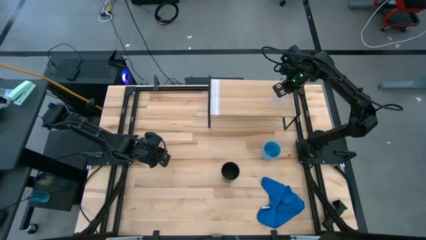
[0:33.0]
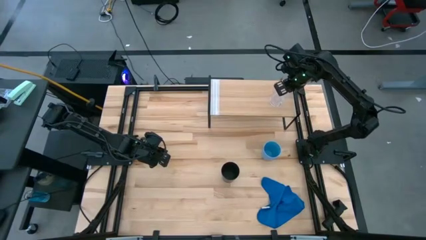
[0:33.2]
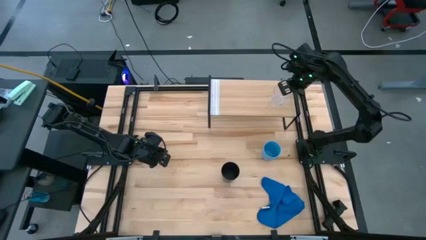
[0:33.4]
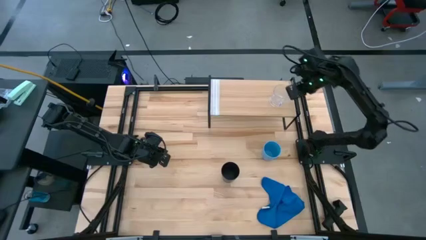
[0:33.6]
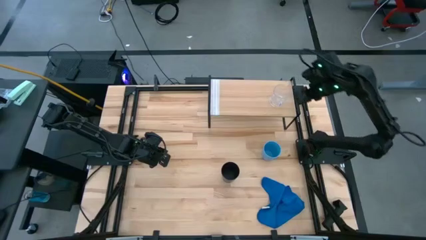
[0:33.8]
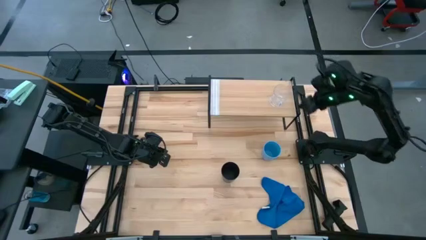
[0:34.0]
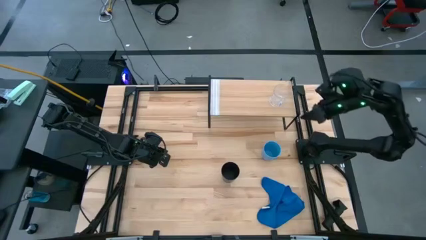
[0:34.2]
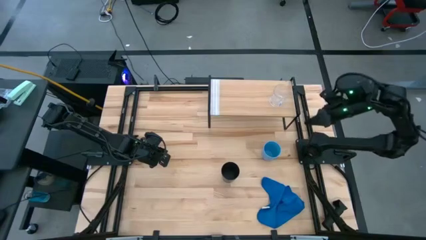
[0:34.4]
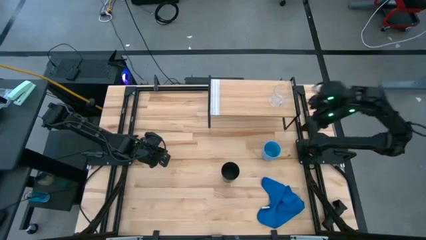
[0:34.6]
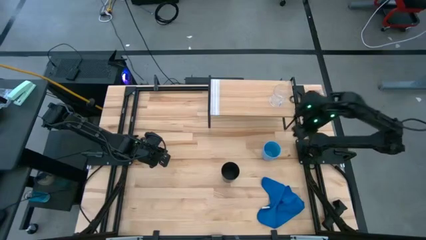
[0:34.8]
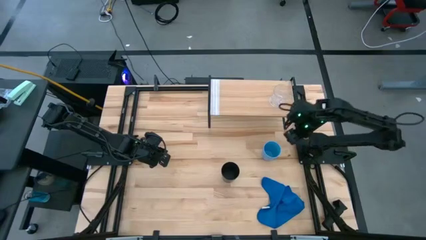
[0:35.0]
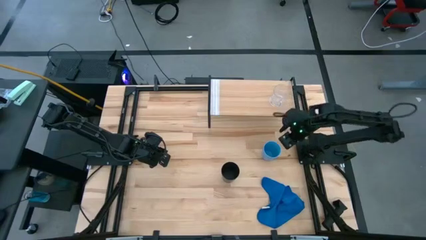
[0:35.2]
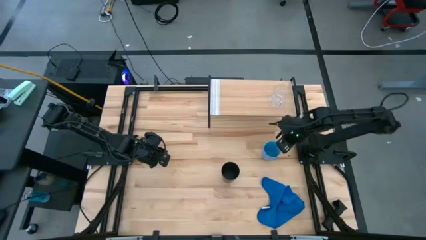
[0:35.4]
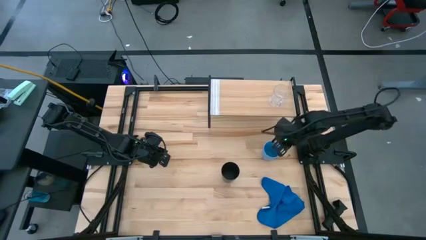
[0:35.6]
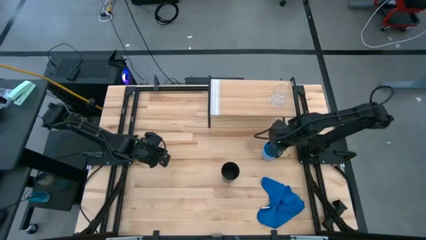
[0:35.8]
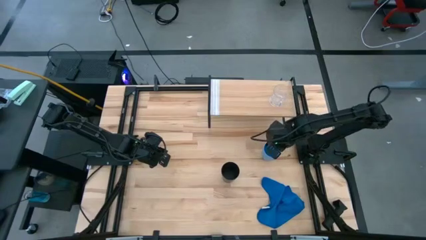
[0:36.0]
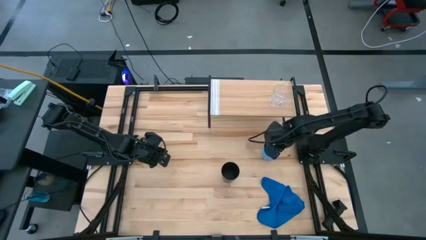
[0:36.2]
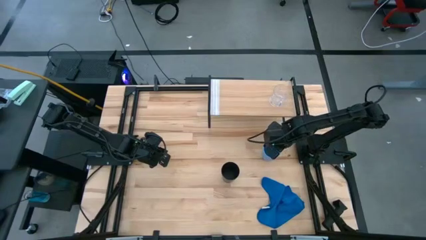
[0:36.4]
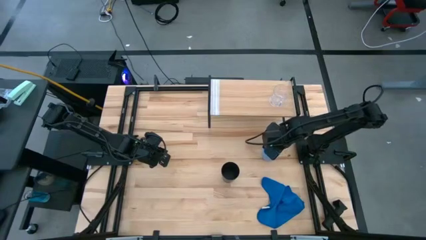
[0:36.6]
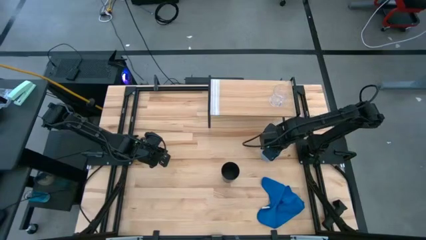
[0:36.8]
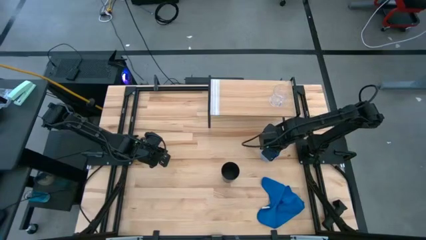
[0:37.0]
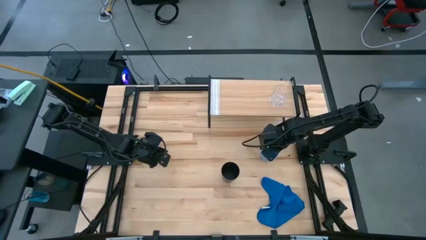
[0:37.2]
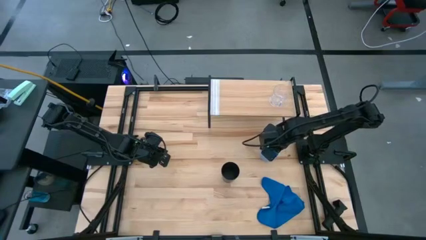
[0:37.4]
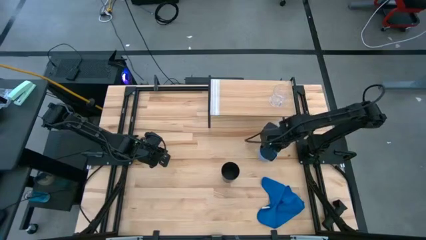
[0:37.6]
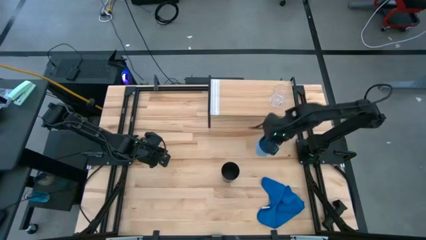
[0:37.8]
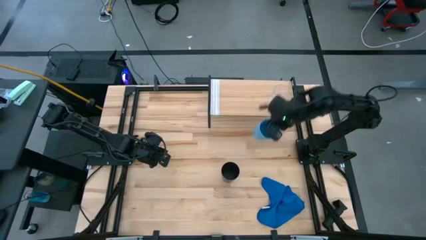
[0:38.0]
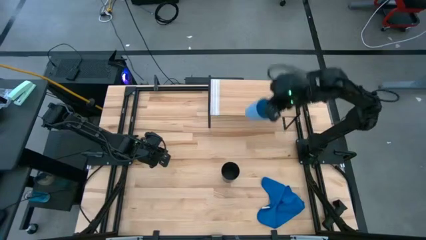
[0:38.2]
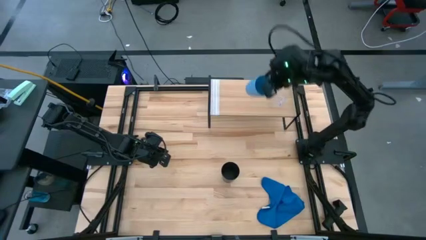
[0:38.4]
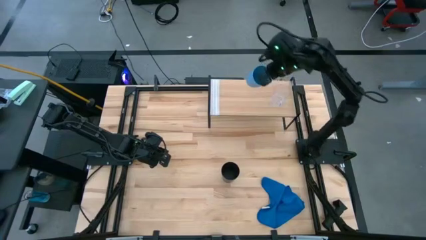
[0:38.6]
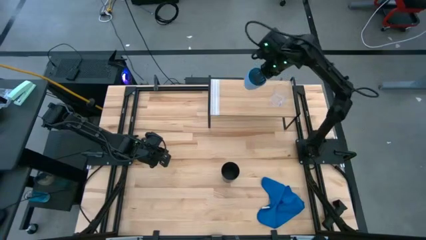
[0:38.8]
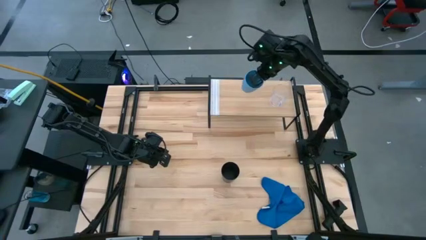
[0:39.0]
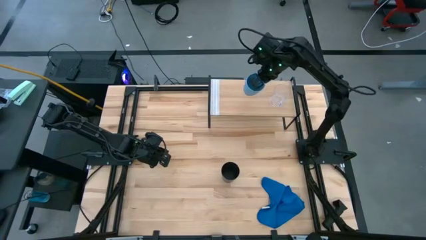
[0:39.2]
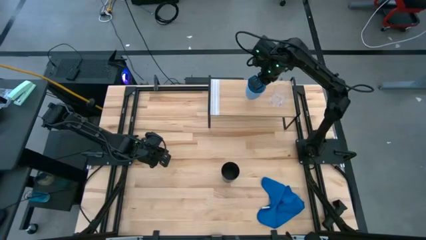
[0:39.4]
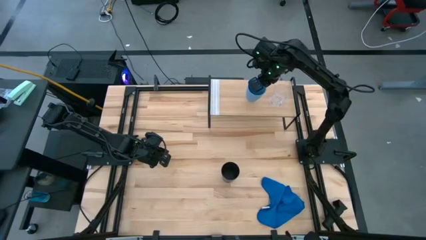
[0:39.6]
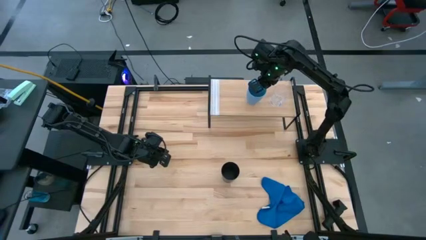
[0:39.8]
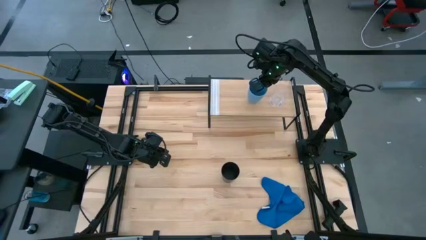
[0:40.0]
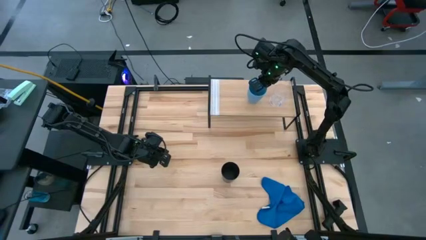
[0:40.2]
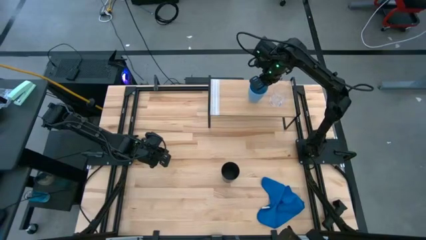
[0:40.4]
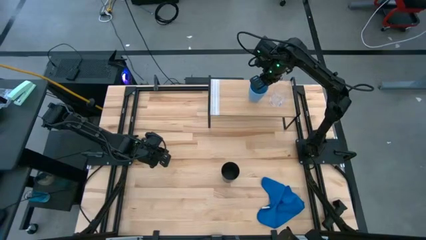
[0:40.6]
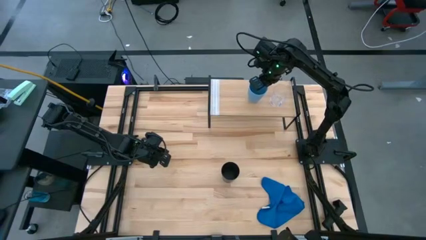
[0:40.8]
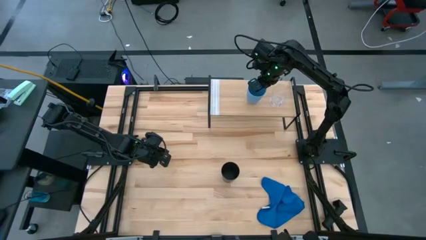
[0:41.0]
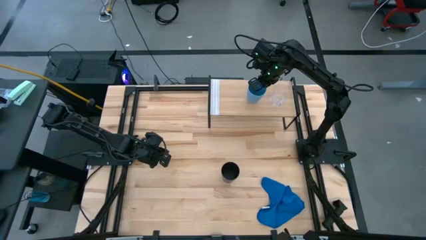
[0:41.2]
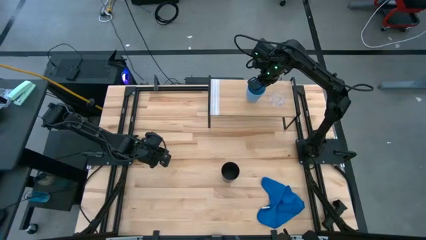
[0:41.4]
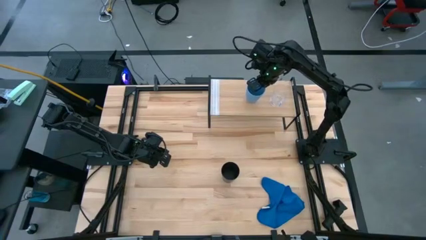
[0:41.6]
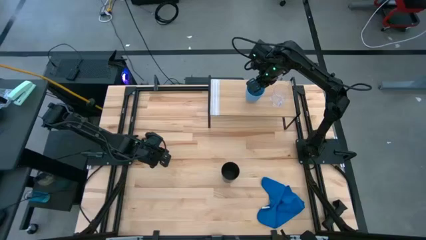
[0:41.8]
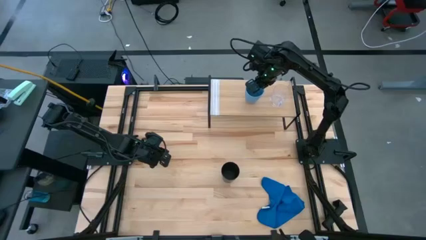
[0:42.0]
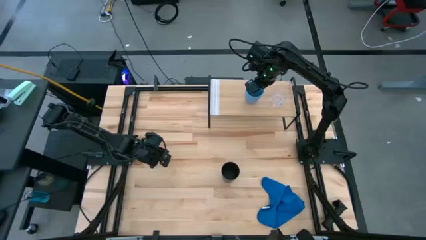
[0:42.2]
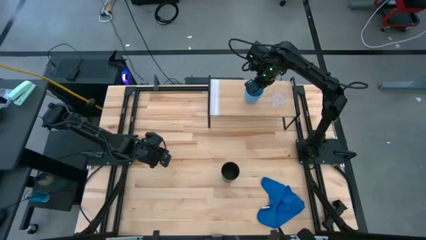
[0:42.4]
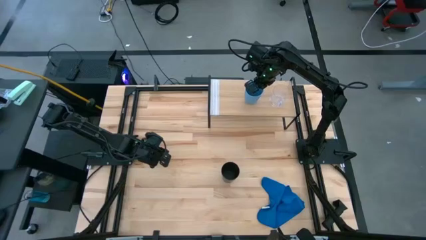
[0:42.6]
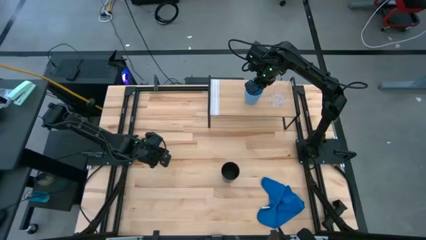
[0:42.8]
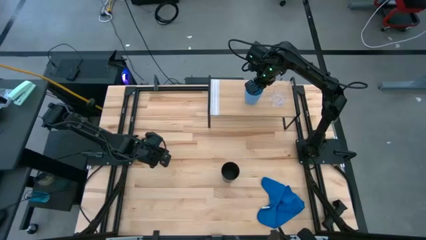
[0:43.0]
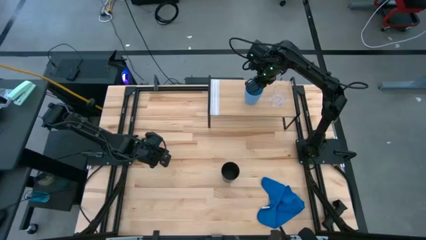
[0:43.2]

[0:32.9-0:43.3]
Task: Stack small to large cups/mugs on shelf
Put the blue cup on the shelf

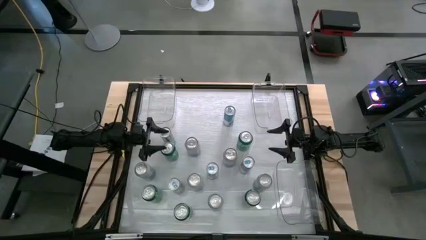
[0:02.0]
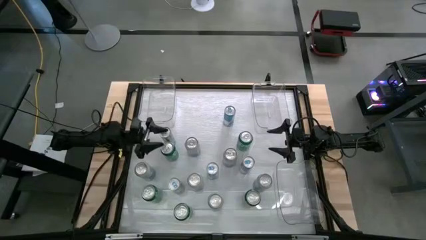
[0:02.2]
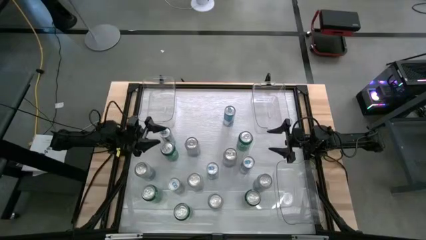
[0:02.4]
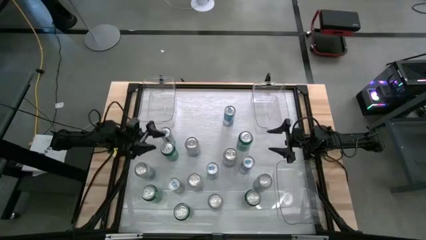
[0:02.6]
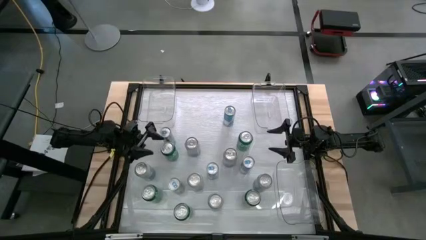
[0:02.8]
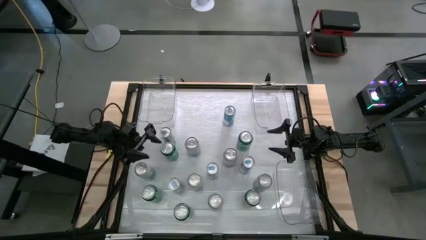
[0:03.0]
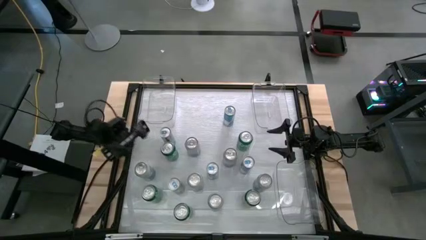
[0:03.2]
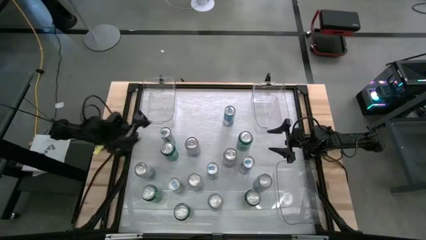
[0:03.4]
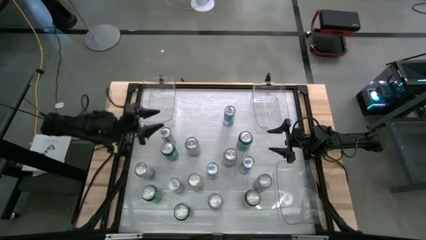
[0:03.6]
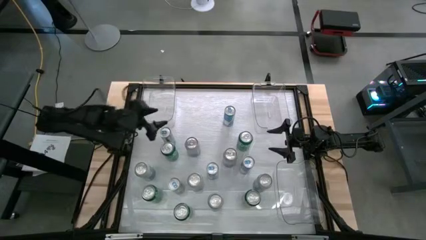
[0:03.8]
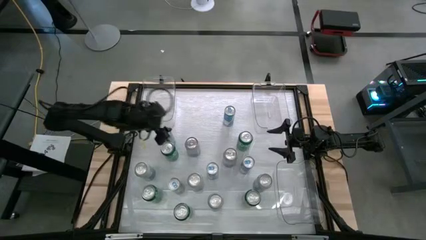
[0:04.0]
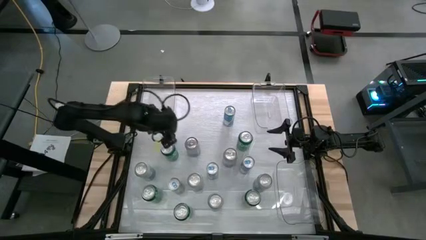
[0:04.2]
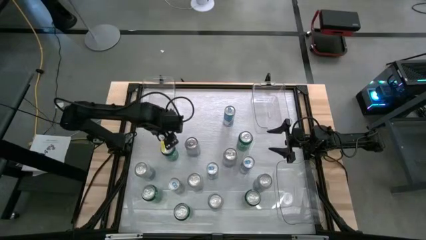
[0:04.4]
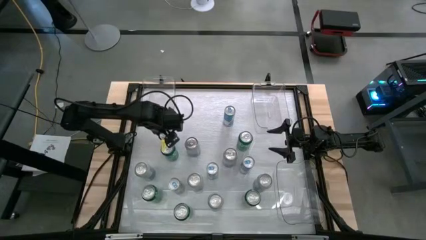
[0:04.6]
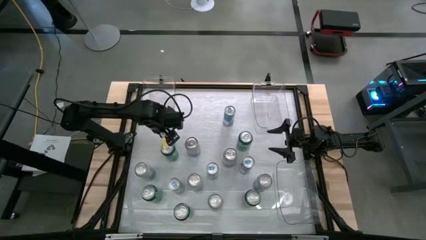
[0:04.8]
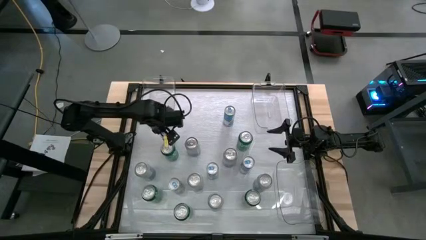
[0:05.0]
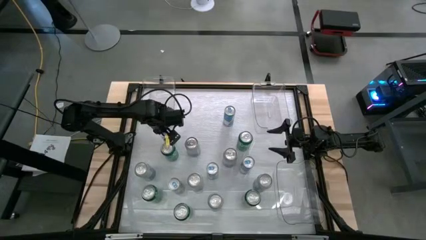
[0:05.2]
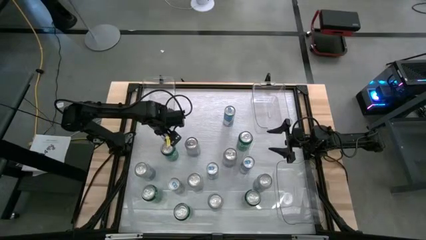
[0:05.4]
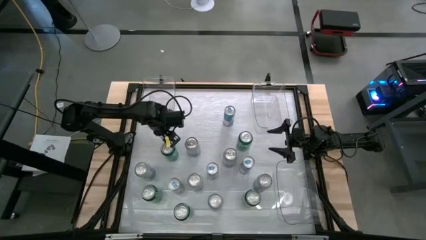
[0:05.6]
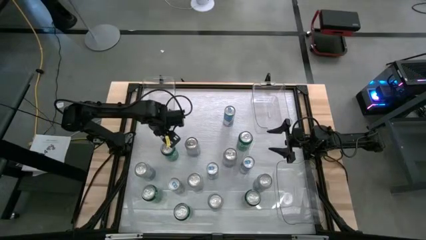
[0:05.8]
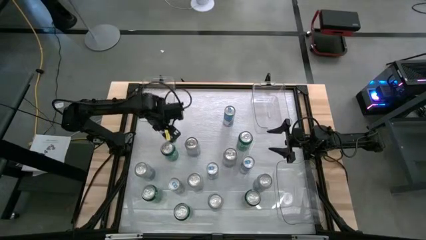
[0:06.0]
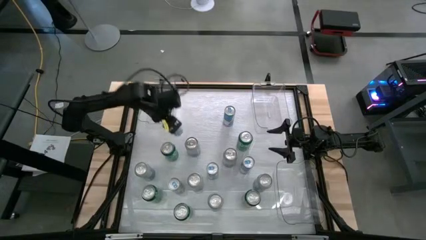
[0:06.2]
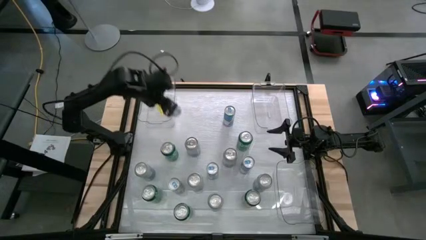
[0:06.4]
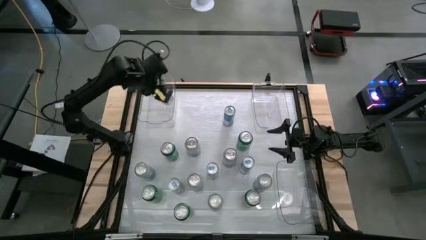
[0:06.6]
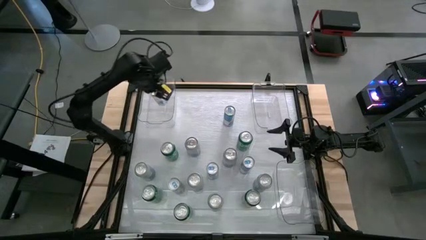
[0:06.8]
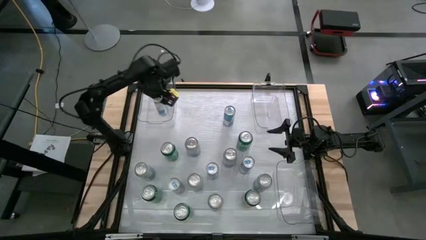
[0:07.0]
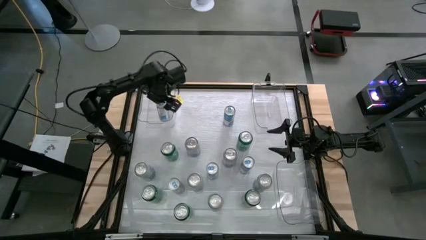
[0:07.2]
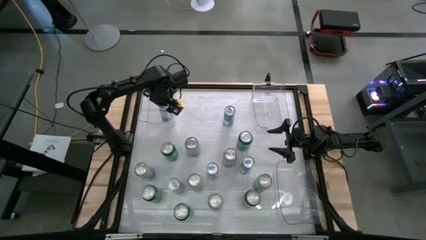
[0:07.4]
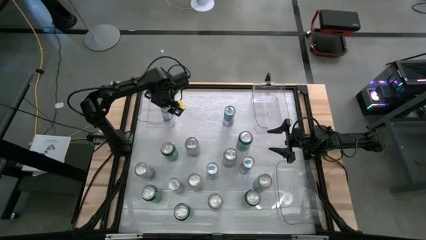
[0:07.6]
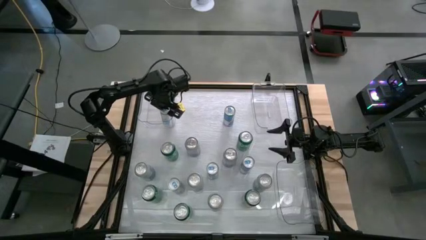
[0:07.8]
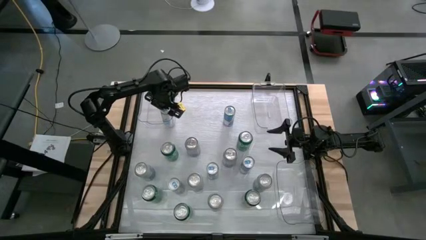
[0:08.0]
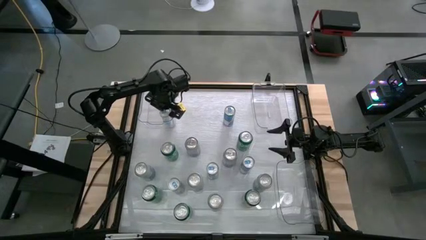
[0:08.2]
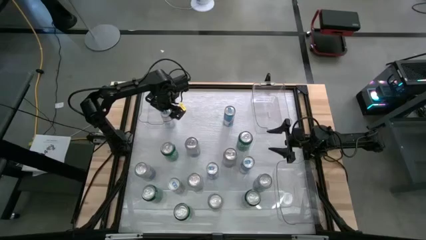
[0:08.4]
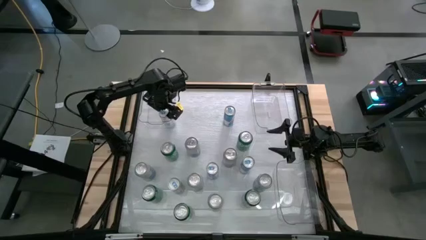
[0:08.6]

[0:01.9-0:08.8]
Task: Sort soda cans
Put the blue soda can into the top left transparent bin
